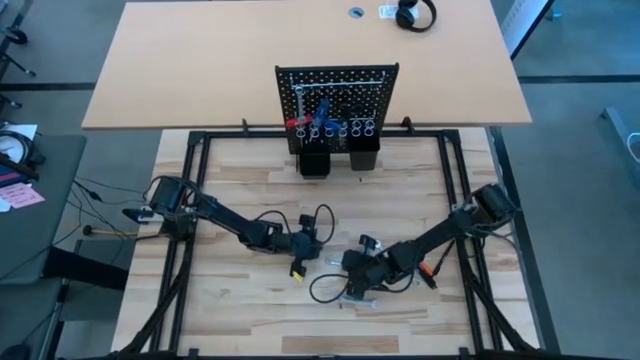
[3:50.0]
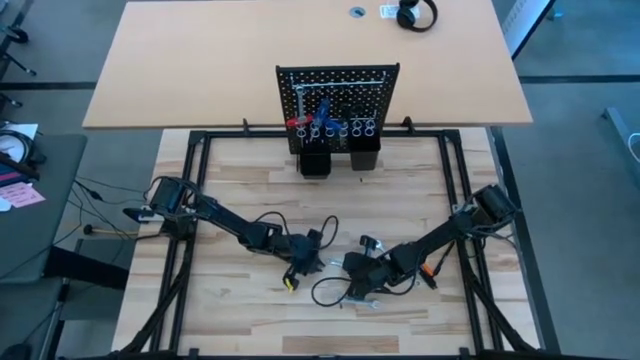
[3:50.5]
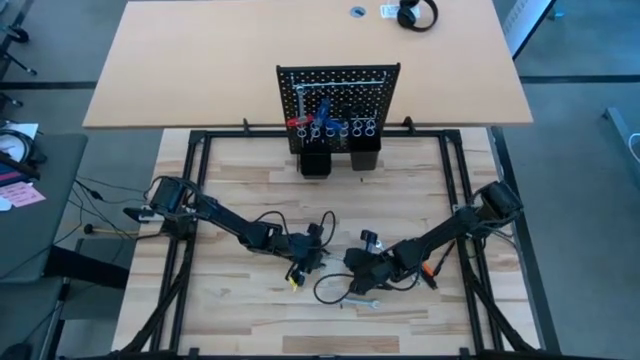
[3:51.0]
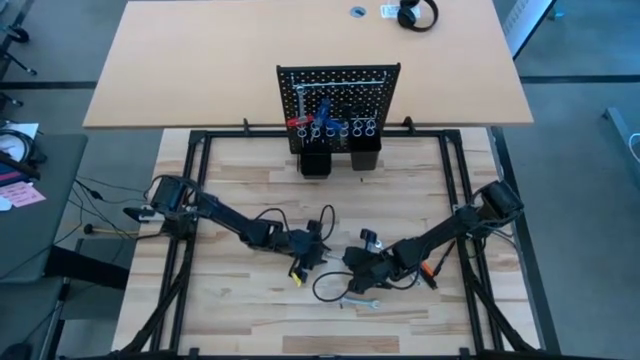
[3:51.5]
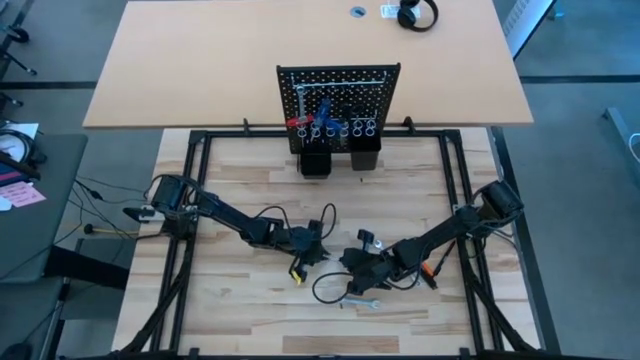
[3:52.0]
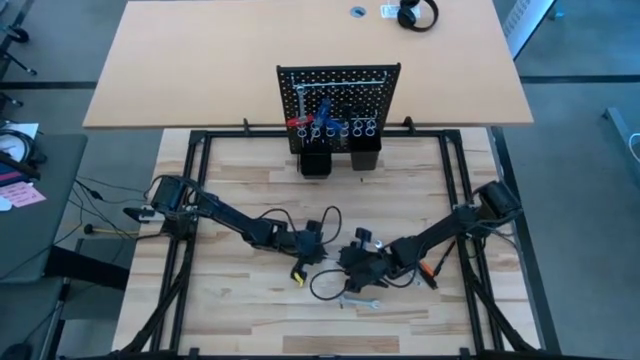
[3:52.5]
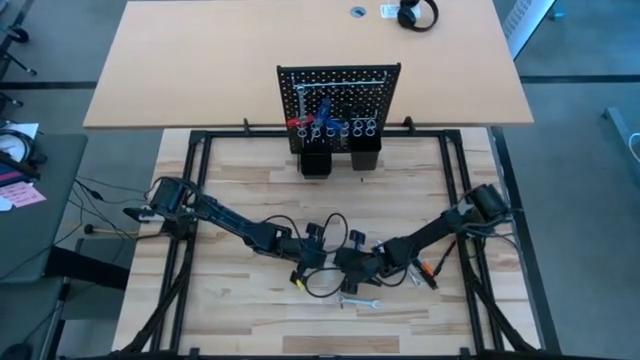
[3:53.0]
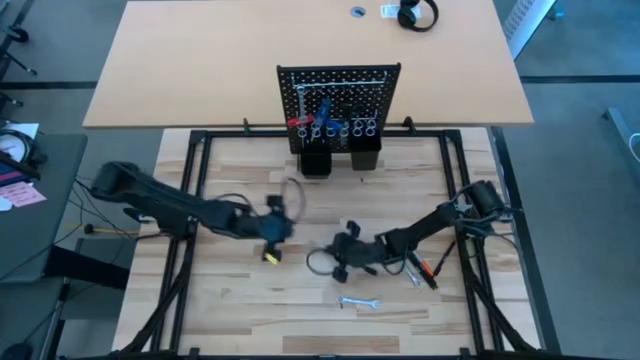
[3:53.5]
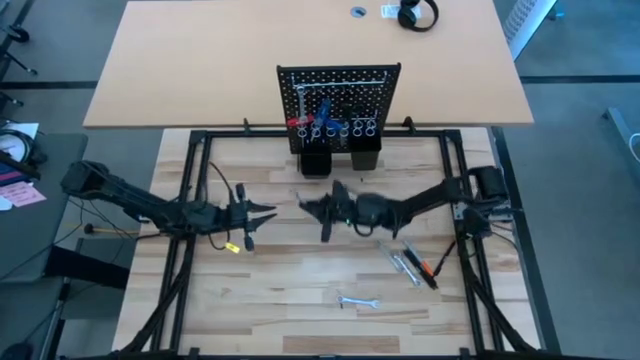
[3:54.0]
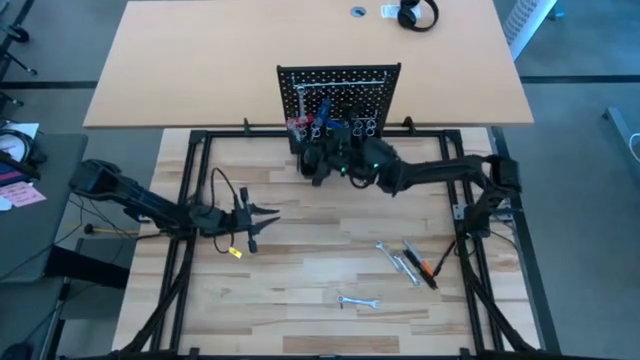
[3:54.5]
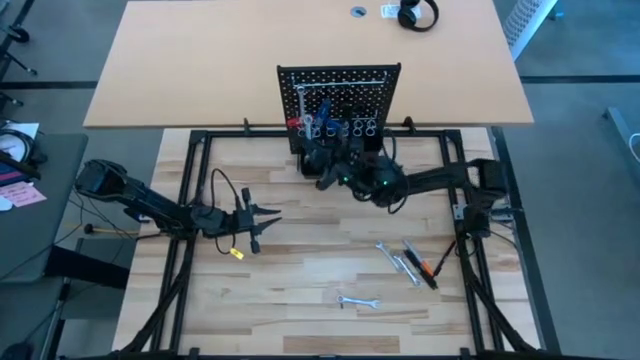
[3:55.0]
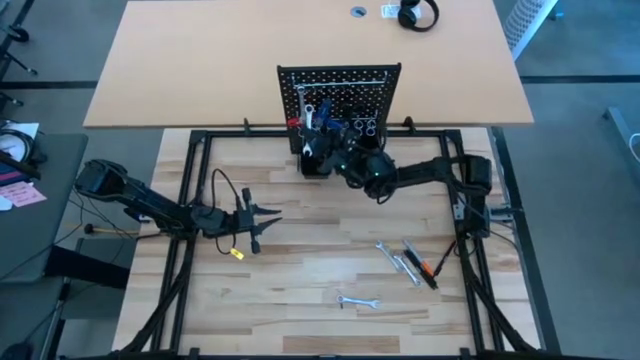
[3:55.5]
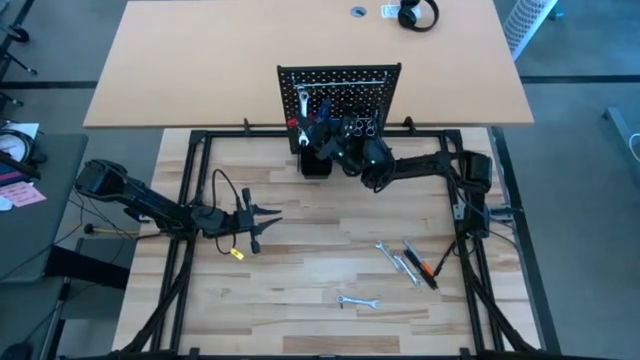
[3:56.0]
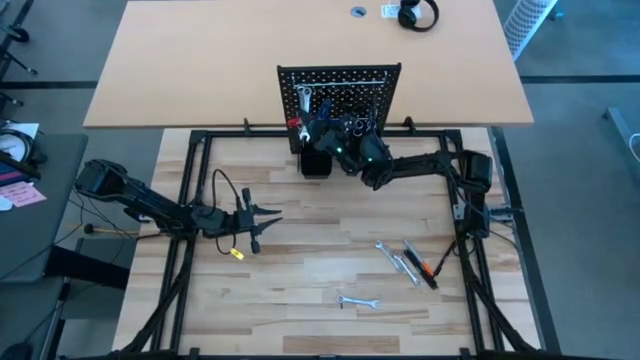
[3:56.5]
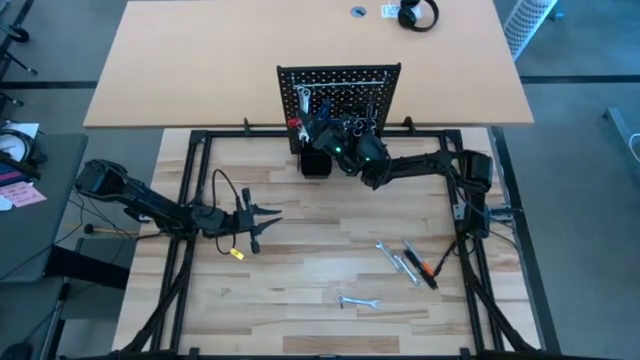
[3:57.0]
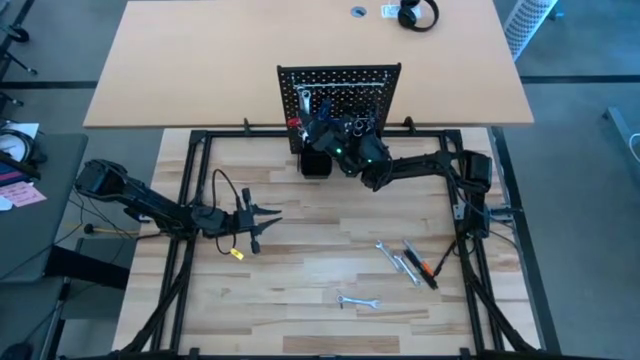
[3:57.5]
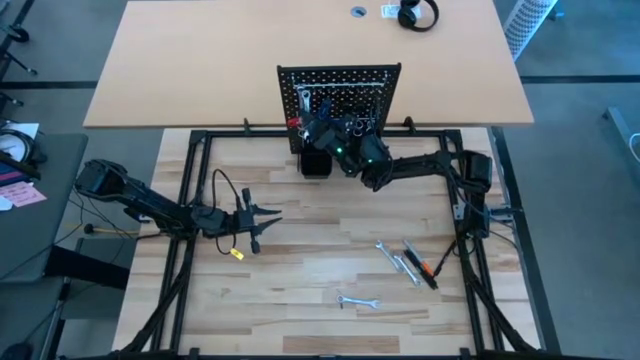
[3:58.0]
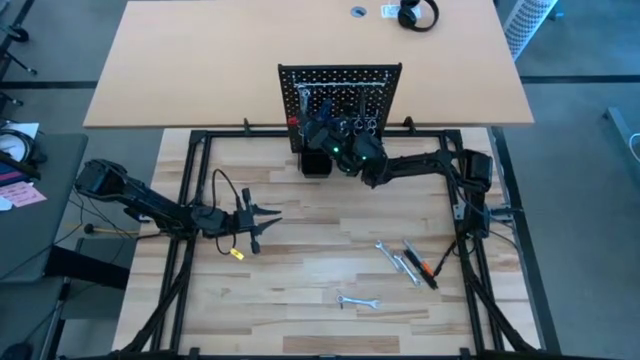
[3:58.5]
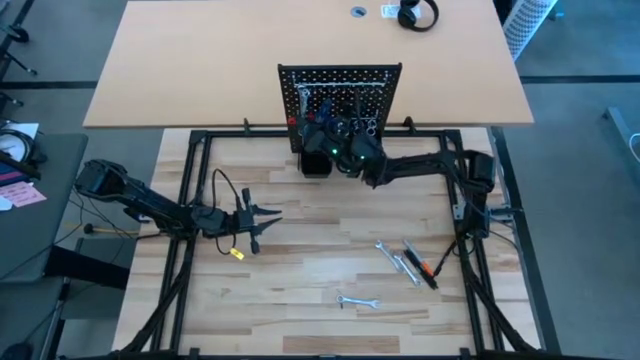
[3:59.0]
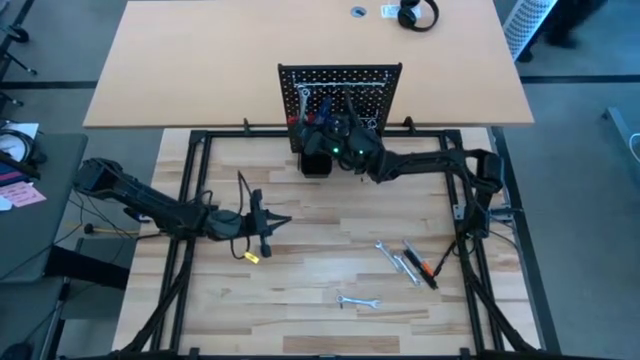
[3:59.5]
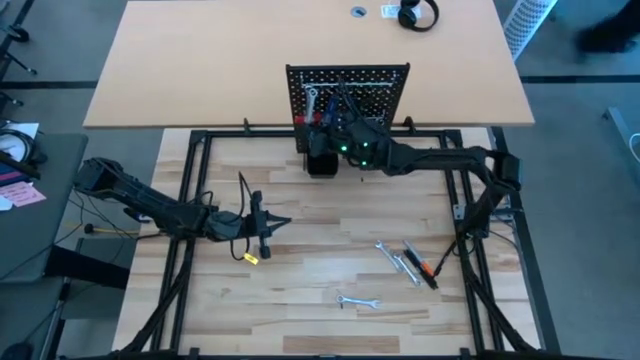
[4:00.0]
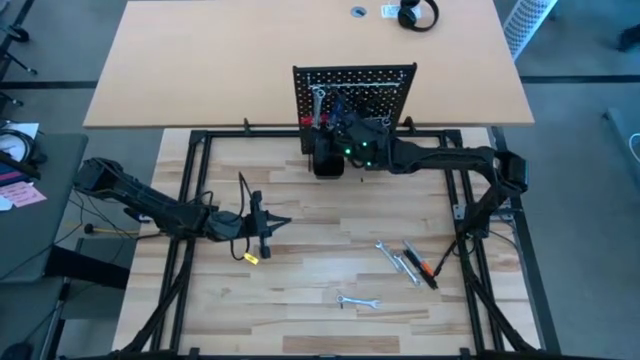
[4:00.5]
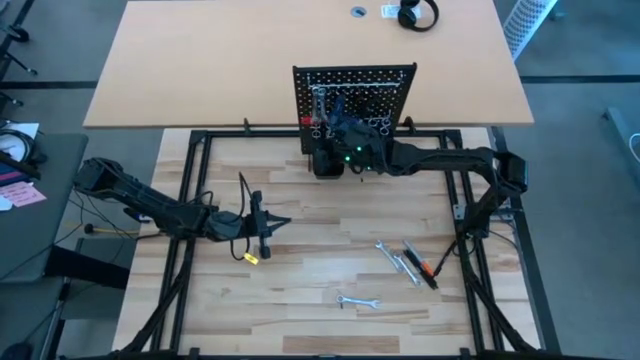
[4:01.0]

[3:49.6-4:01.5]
Task: Hang tools onto peg board
Hang the wrench on the pegboard

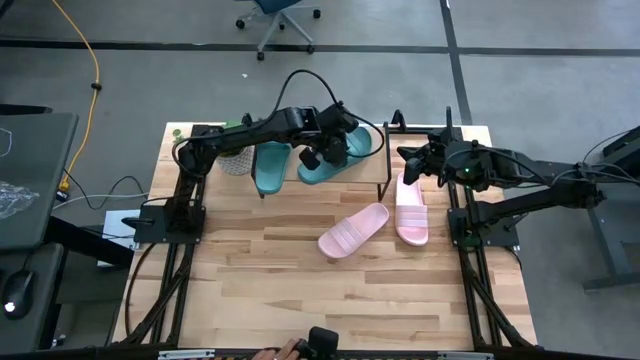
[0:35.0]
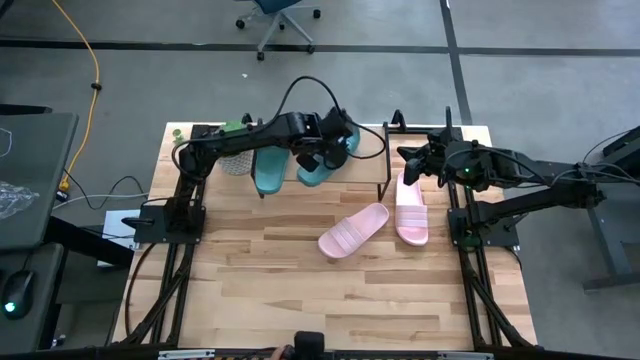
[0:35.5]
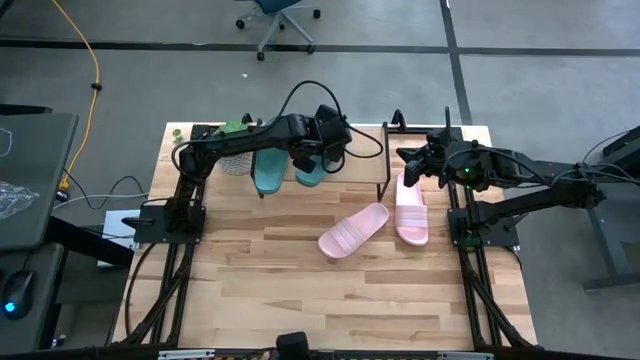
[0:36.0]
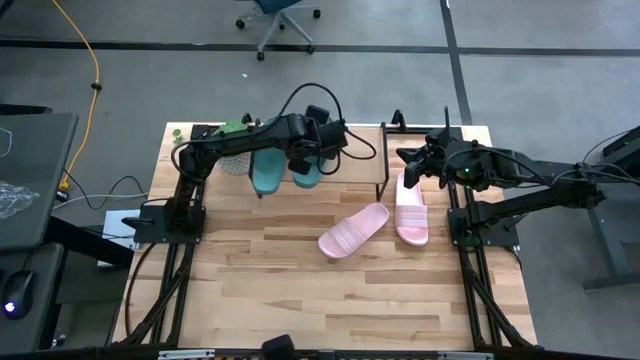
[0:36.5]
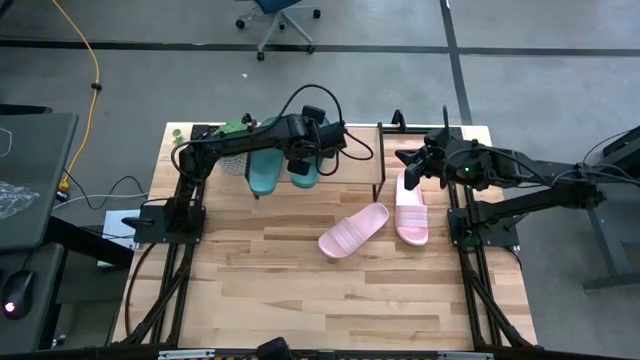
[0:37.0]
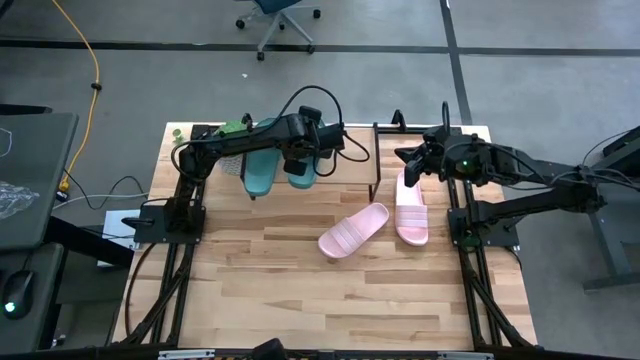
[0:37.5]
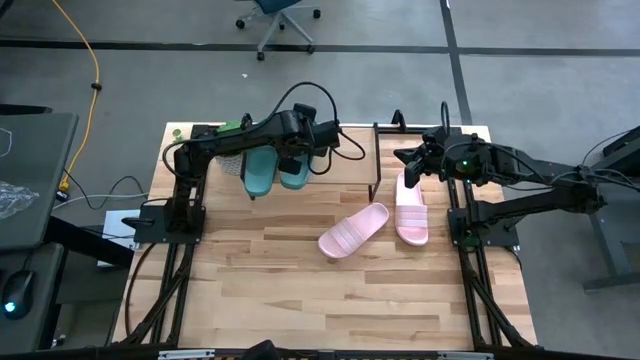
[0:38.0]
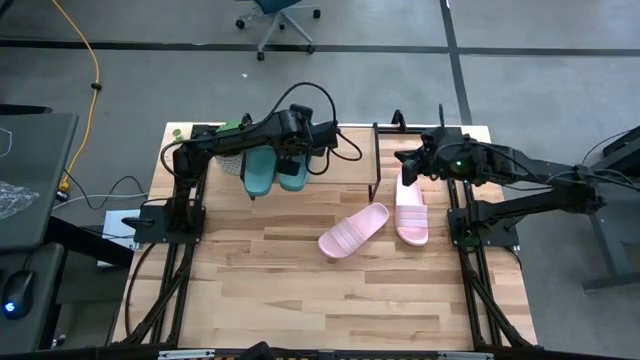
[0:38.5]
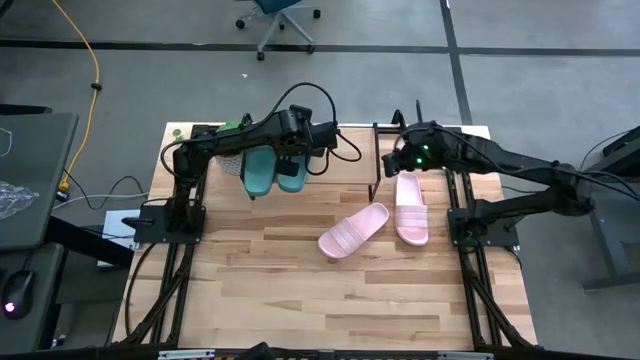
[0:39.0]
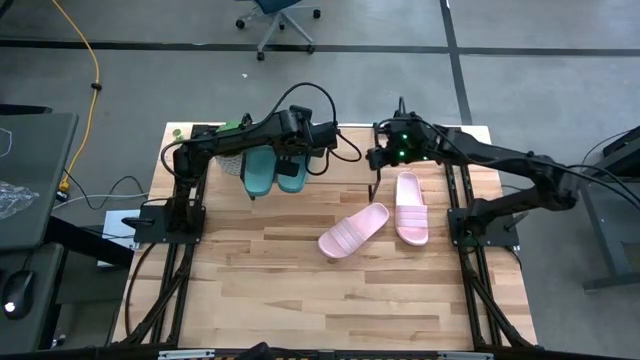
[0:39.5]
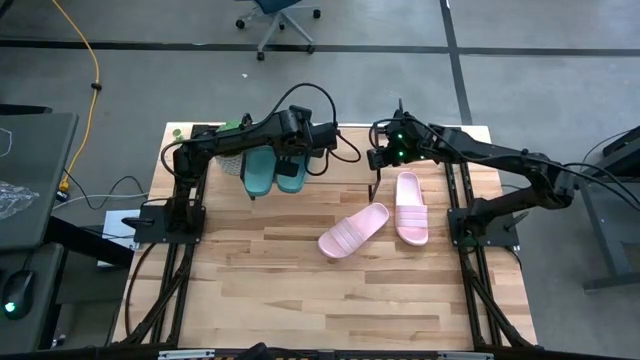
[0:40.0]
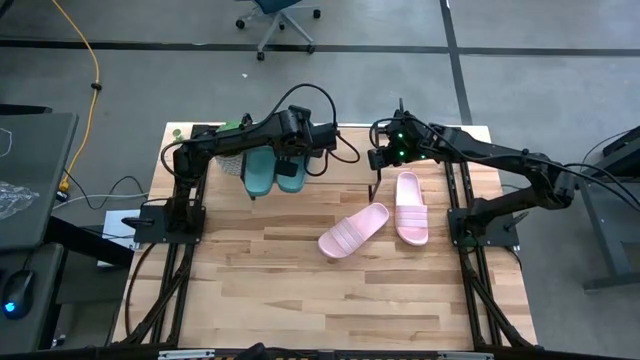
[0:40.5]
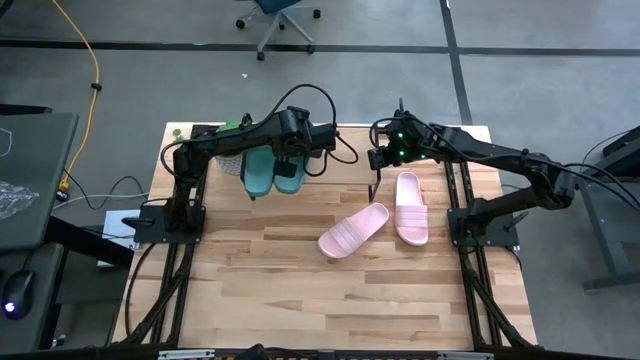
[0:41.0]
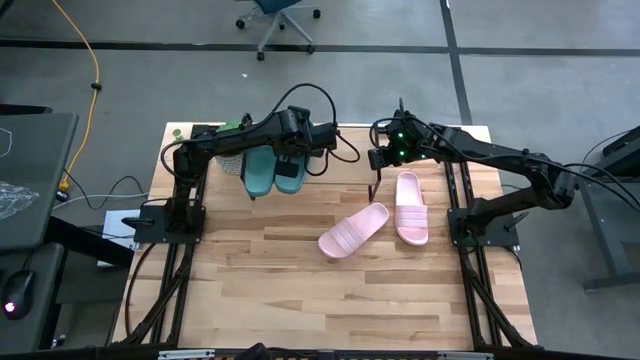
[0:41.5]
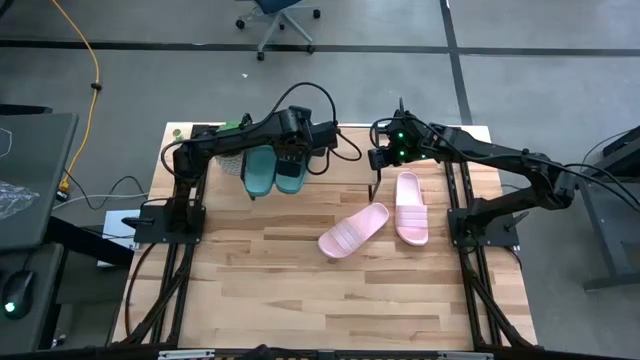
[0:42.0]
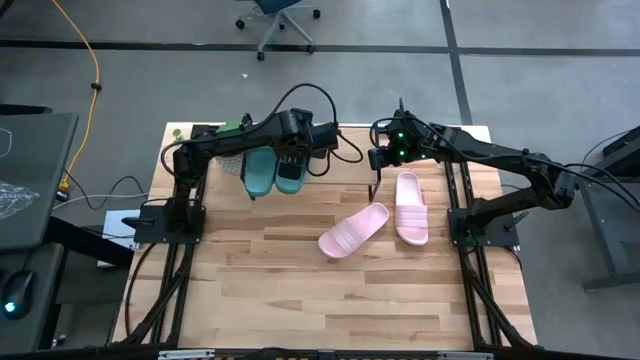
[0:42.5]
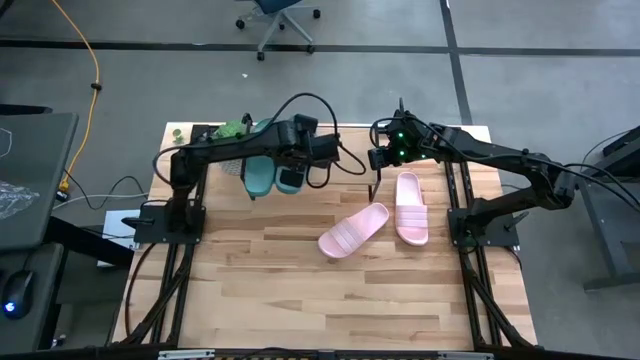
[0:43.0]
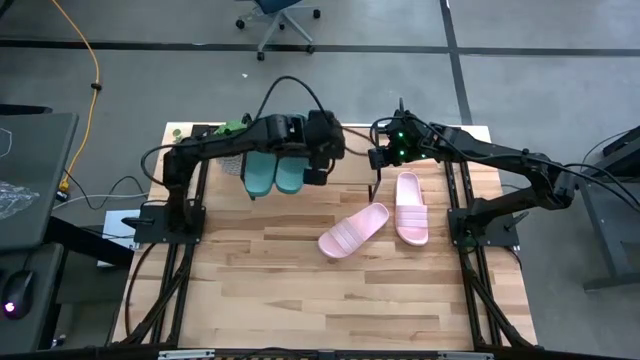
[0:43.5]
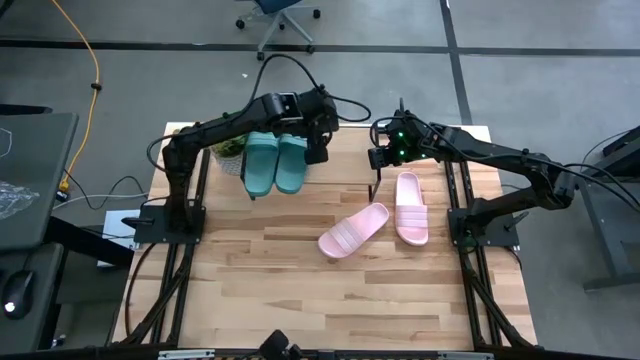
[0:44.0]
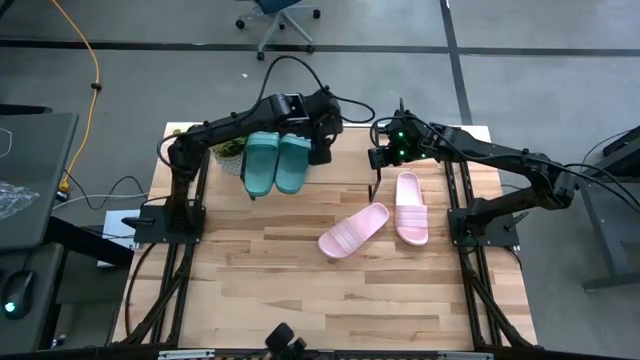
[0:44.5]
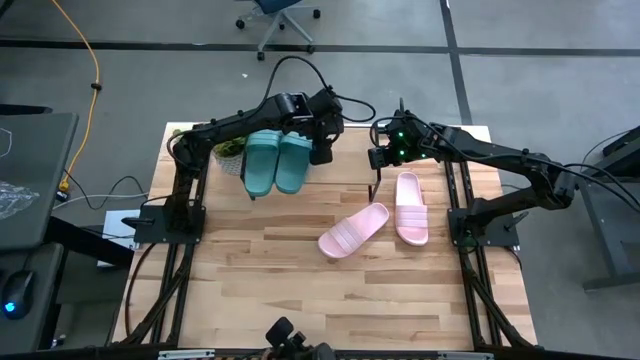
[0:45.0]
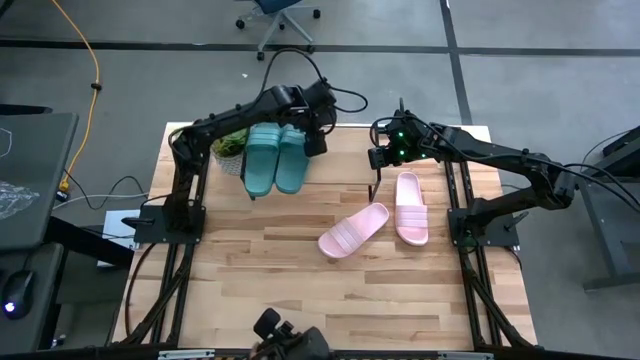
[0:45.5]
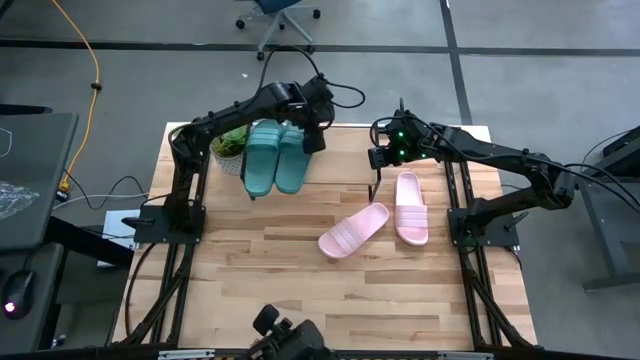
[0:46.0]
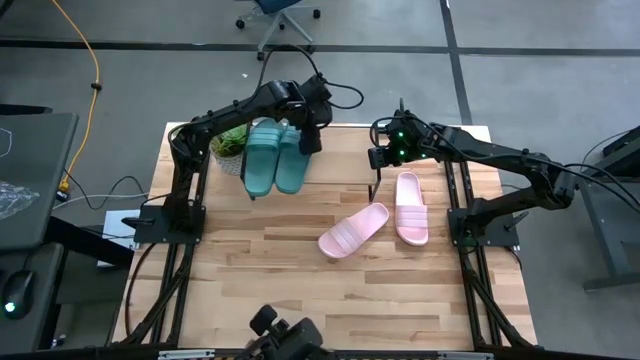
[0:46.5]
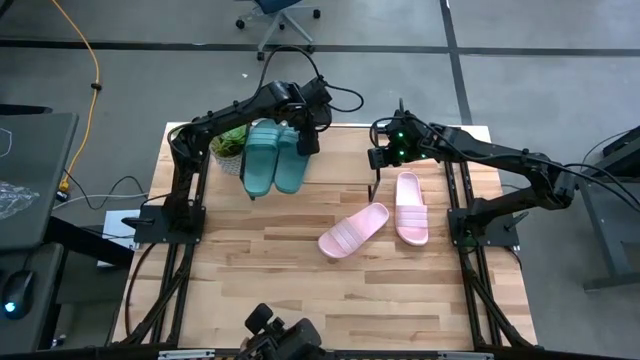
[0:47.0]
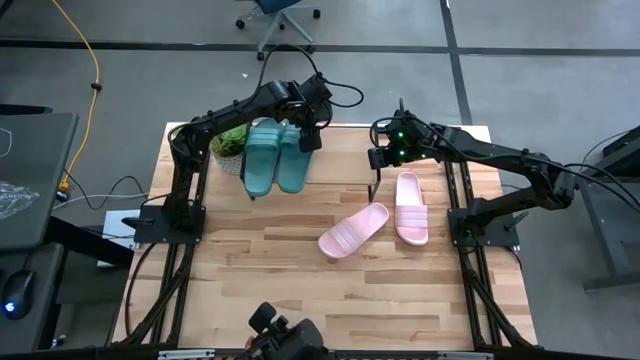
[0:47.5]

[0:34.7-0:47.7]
Task: Pick and place slides into the shelf
Put the green slide on the shelf
